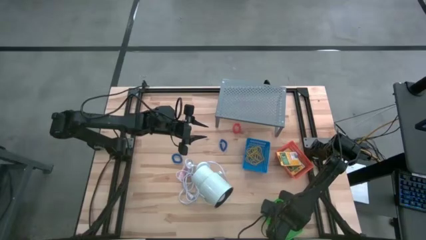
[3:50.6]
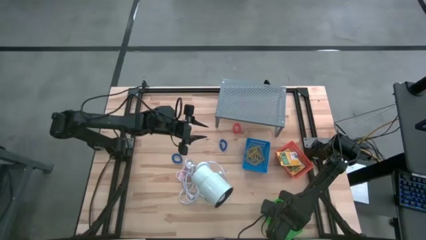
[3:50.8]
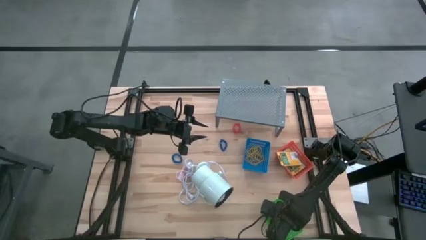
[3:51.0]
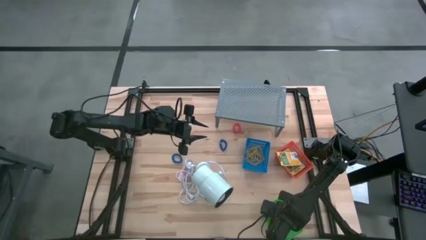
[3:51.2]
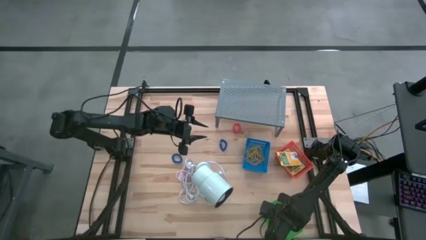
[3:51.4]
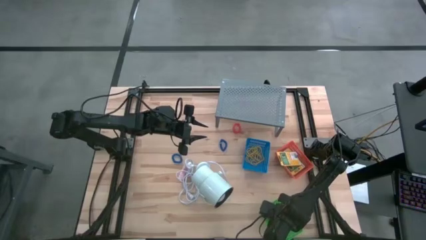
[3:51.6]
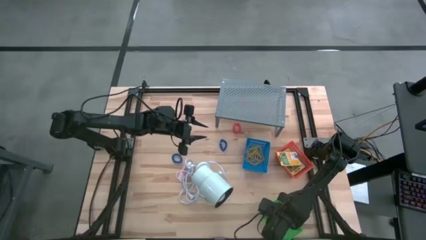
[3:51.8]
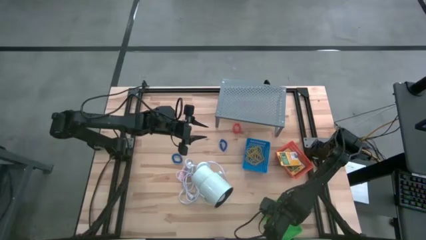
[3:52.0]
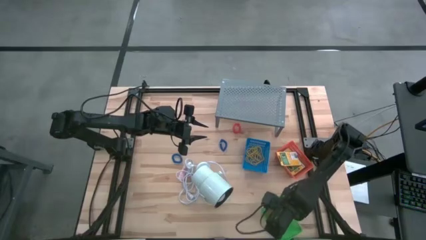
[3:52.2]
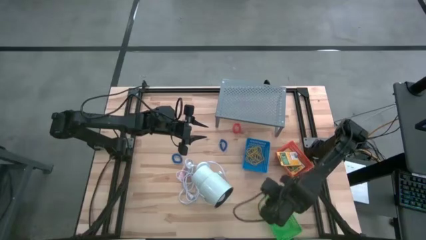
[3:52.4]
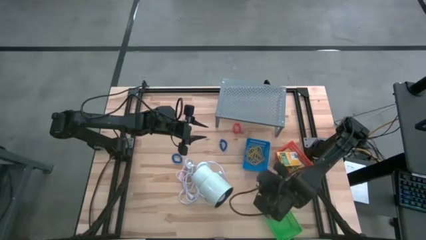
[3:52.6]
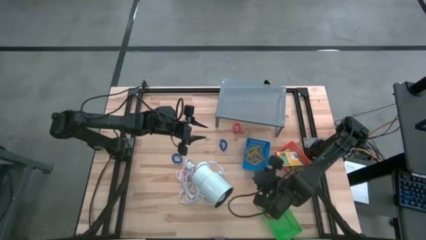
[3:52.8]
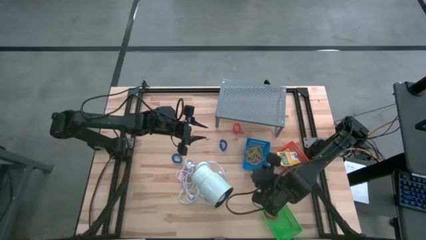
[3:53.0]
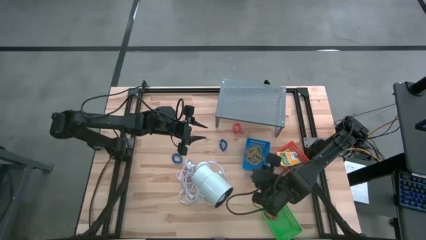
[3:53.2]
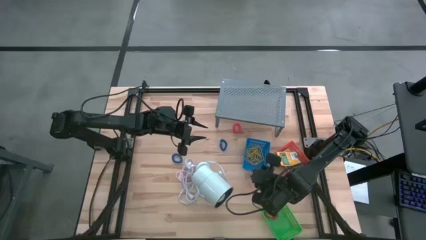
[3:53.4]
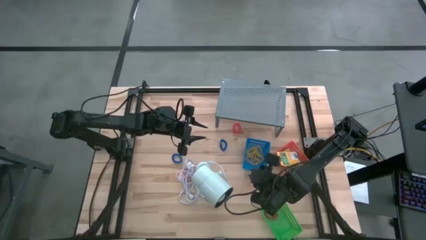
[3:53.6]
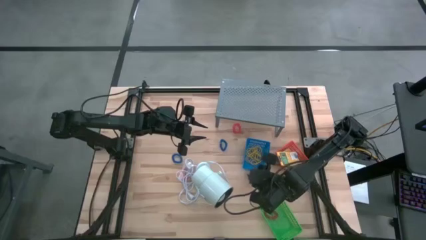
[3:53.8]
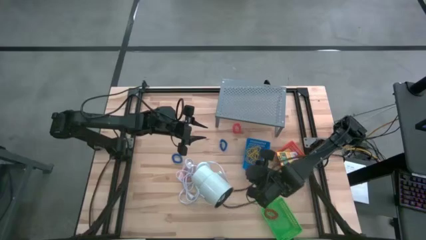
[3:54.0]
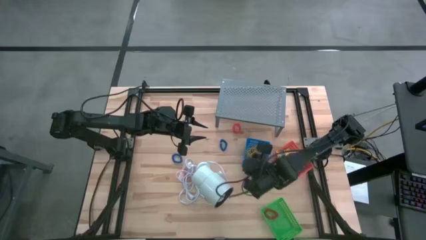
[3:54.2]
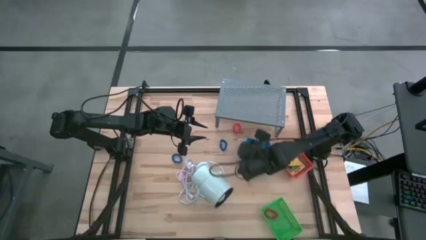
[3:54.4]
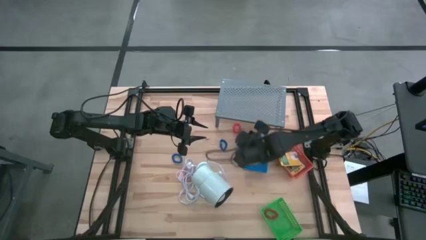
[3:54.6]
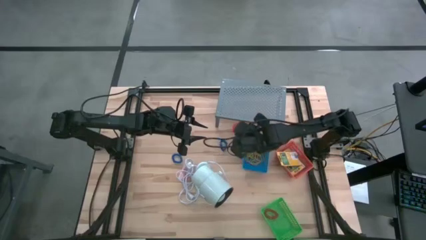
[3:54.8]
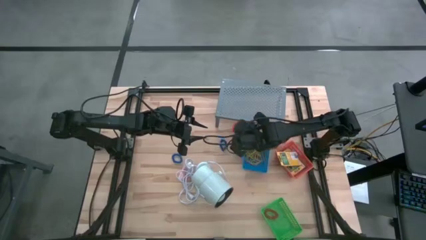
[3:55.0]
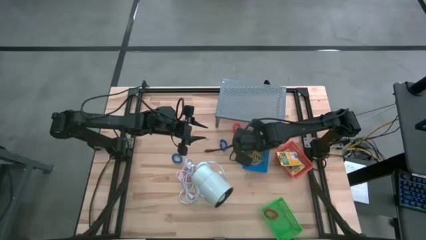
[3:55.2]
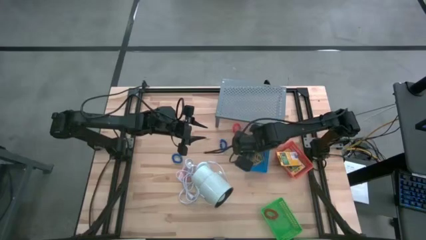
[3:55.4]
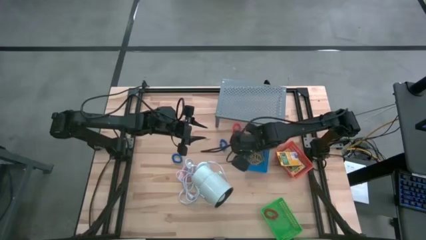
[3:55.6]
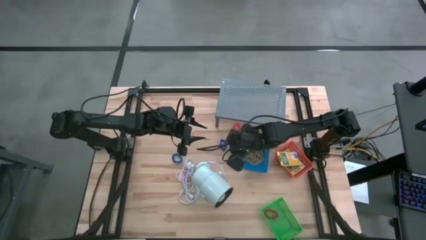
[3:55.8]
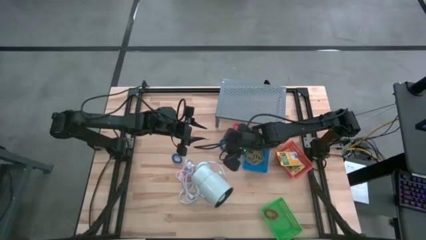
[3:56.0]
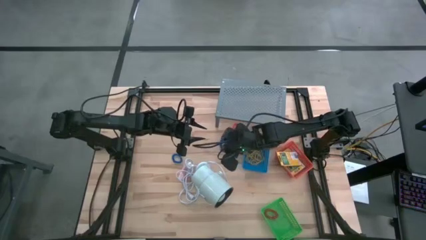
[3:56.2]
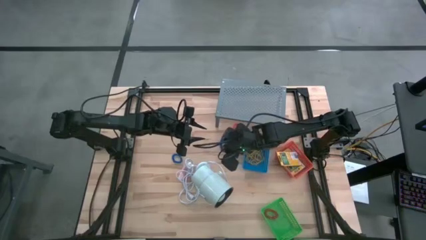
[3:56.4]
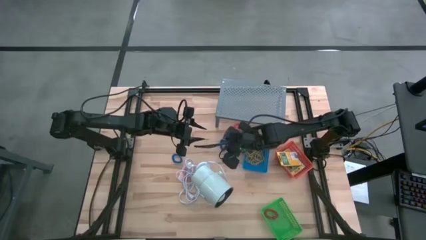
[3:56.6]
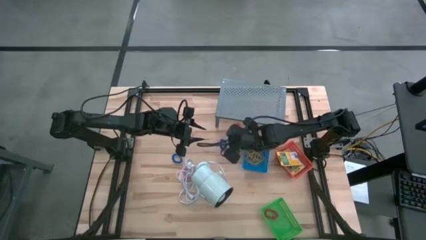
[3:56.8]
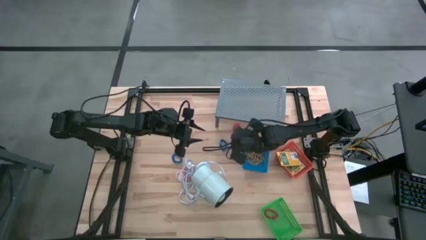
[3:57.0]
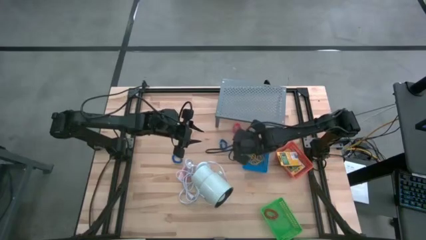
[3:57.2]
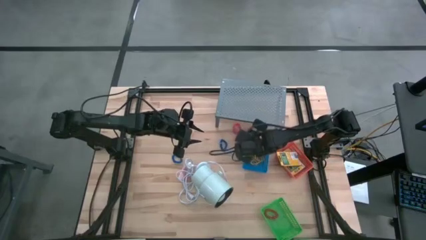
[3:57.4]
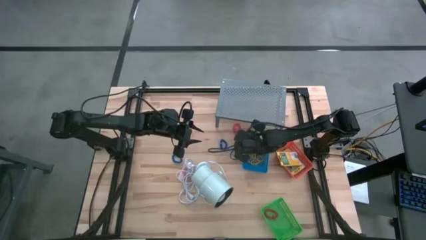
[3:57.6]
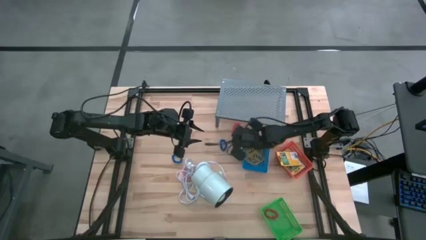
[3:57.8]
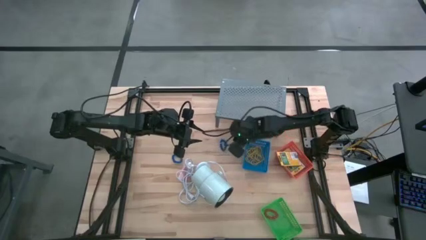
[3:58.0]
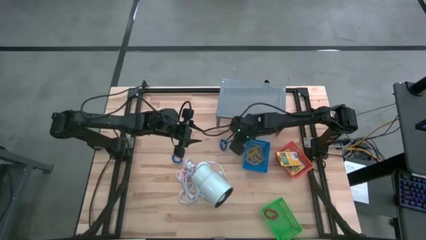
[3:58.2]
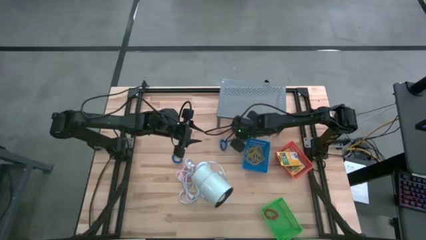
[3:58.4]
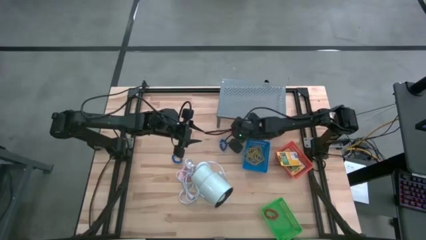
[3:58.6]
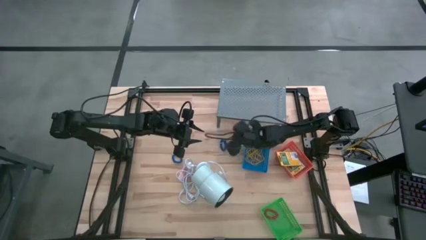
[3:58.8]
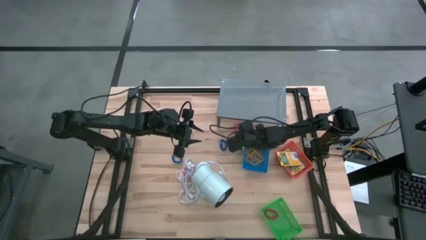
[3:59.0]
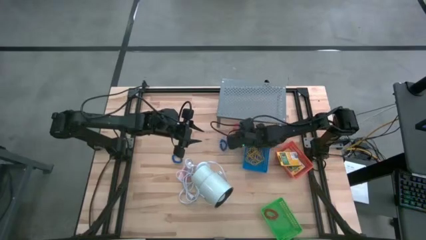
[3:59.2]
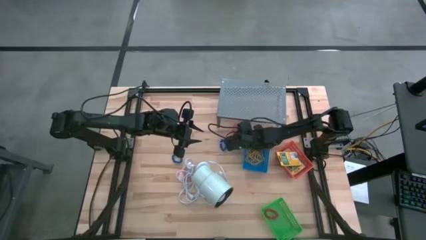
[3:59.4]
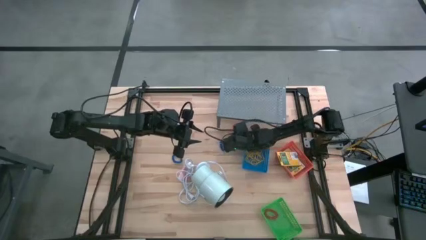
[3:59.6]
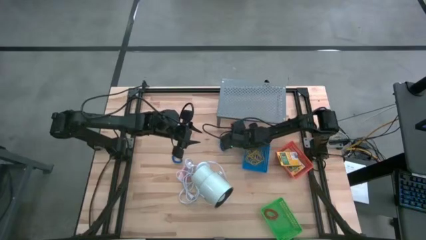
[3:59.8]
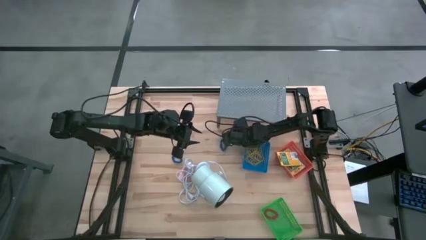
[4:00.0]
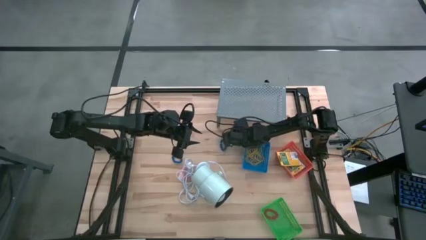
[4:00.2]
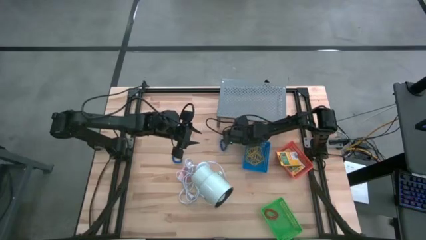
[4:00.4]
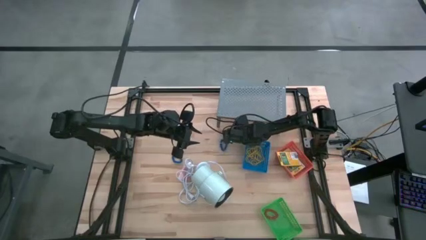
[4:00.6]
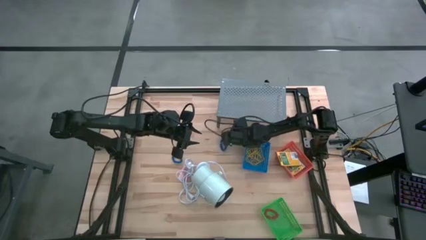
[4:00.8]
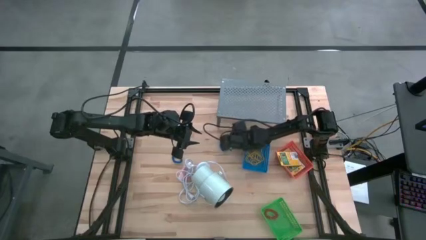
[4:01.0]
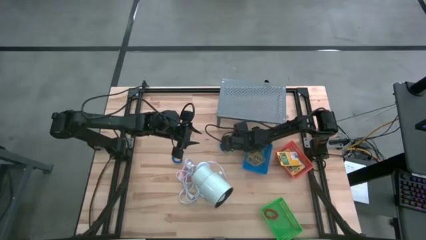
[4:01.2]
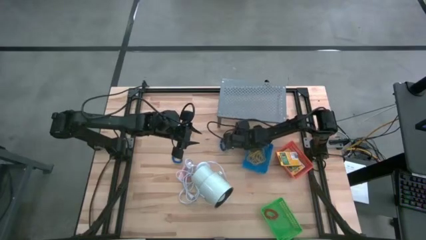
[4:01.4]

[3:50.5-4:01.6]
Task: Pick & Place Office Desk Supplies
Put the orange spring keychain into the green bin

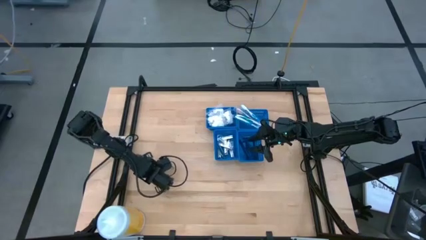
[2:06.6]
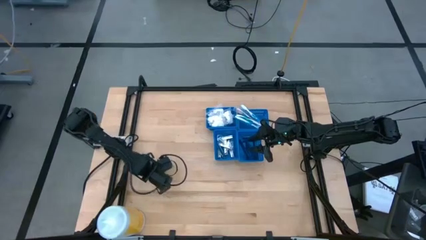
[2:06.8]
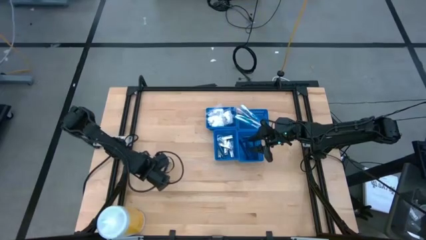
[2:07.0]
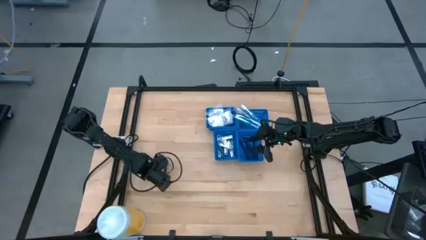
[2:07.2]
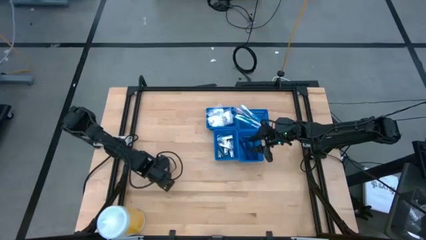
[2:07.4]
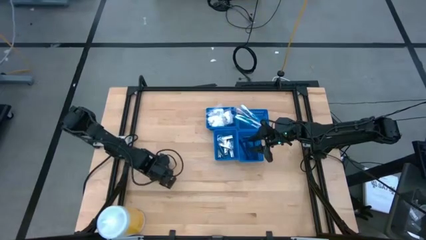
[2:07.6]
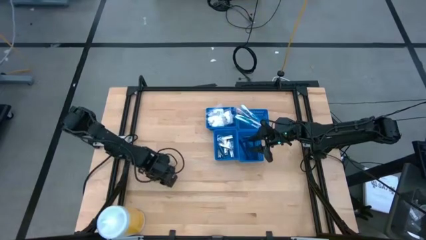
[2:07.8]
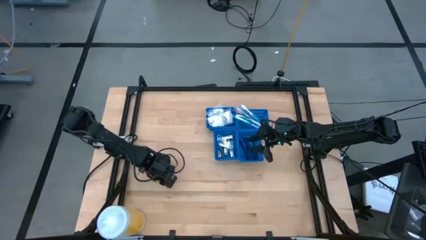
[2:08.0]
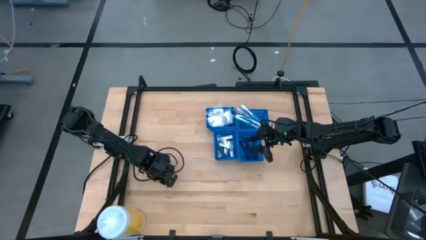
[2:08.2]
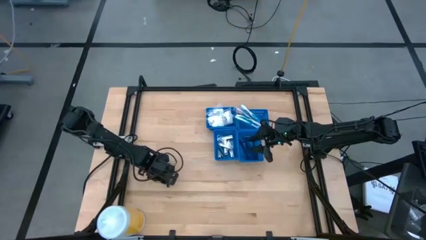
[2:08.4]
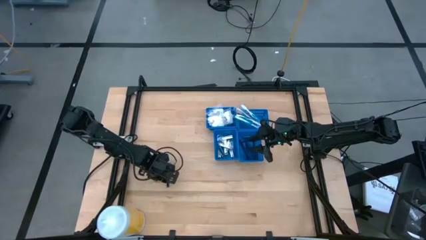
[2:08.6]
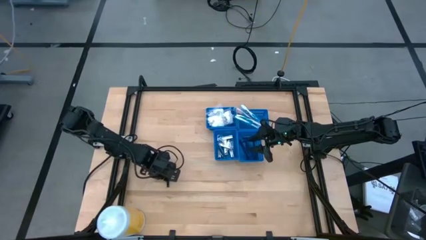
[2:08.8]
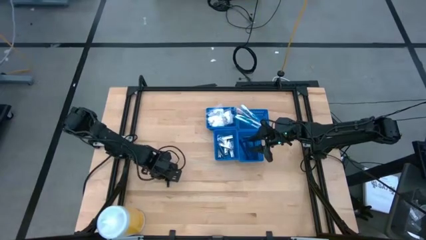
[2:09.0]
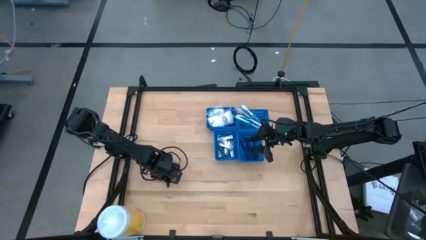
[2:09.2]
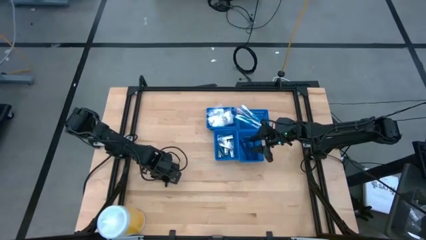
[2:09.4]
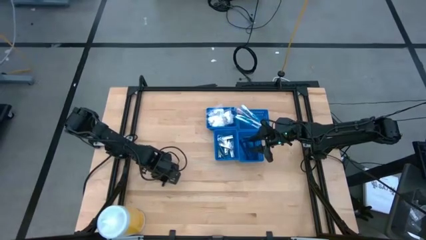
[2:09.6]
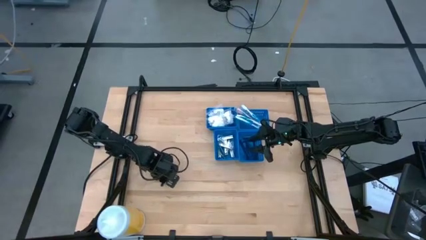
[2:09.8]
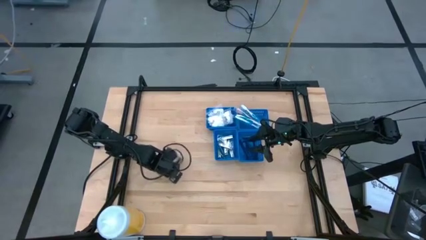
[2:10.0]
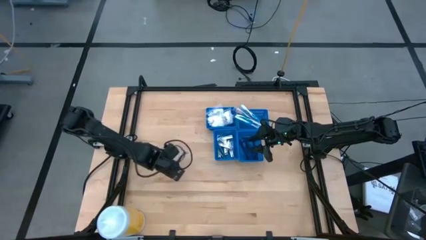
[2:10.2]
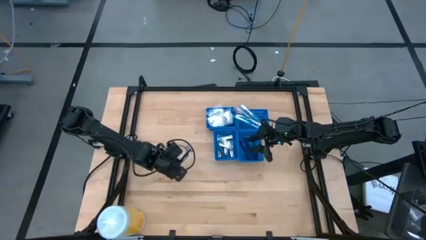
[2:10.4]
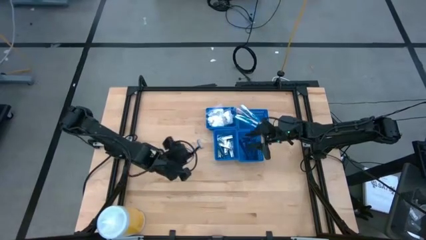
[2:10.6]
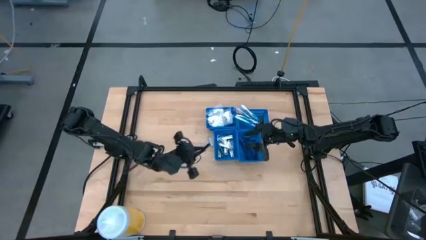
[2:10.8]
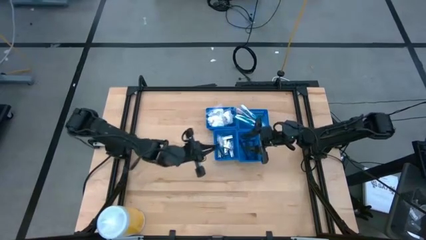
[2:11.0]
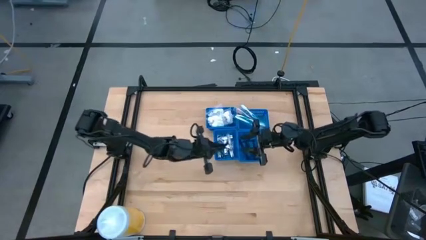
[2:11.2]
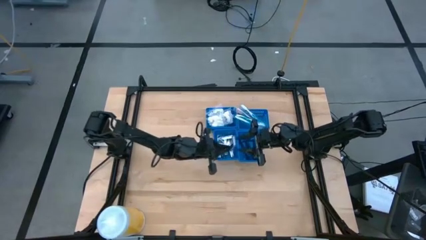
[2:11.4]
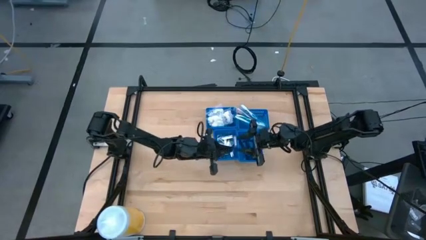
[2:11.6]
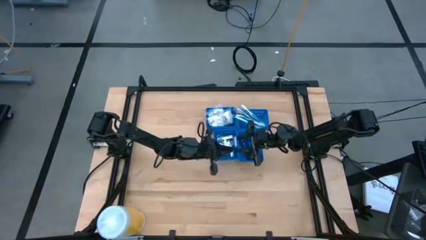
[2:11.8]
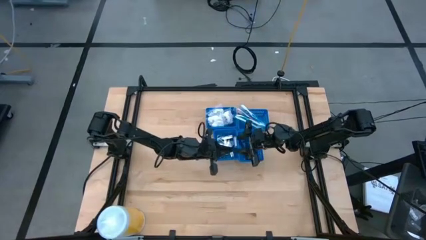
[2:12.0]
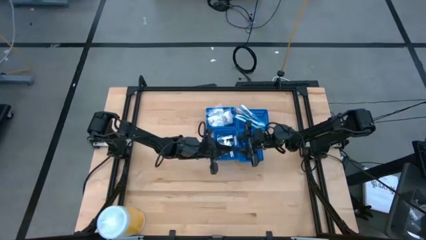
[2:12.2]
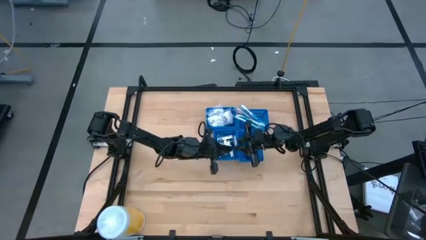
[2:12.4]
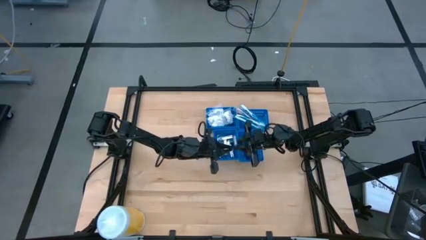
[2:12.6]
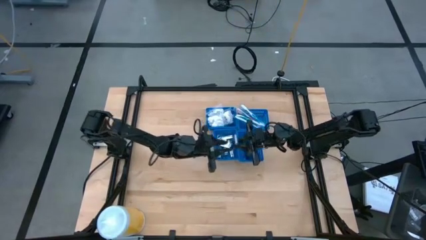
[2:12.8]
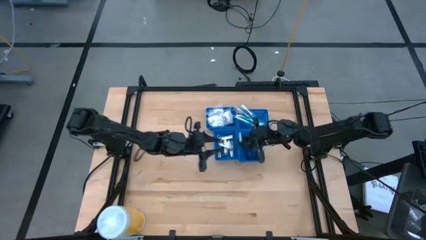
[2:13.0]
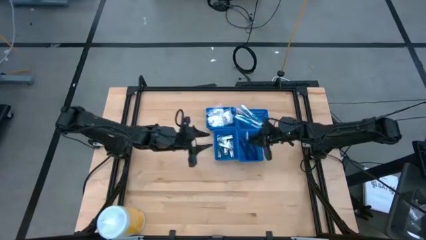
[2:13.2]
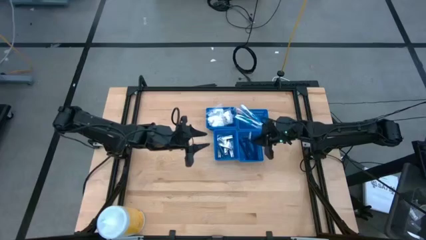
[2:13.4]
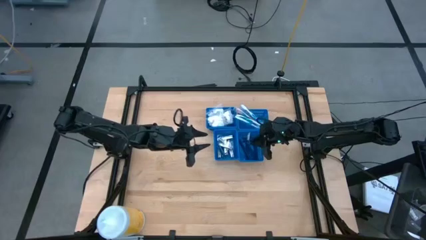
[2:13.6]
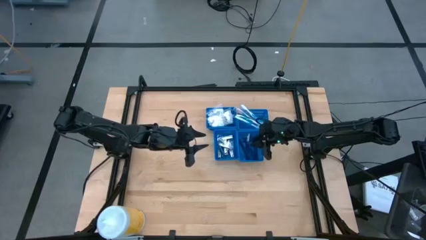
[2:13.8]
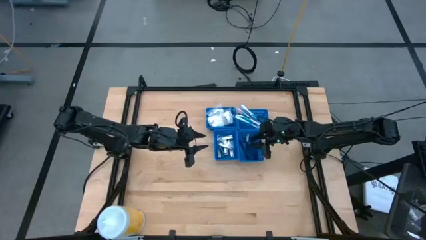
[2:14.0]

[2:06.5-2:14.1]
Task: Pick & Place Travel size toiletries
Put the blue razor into the bottom right blue basket
